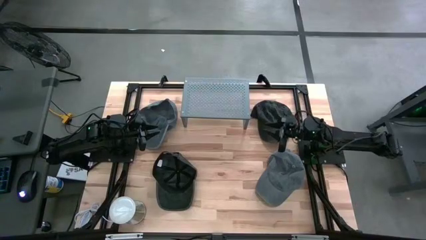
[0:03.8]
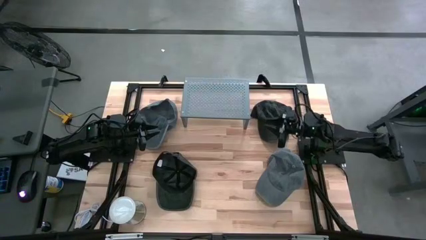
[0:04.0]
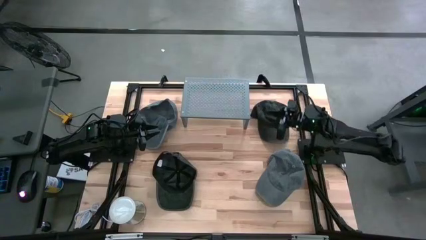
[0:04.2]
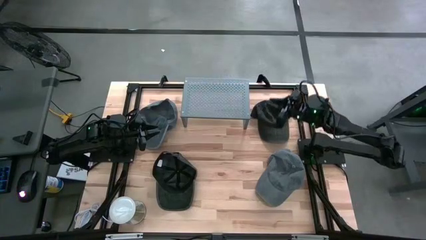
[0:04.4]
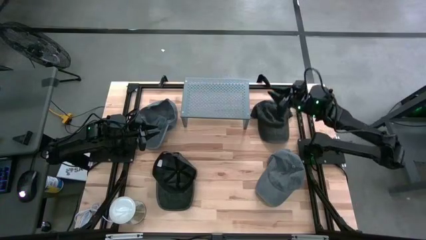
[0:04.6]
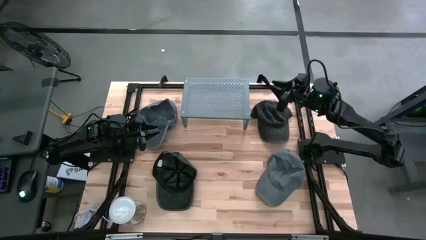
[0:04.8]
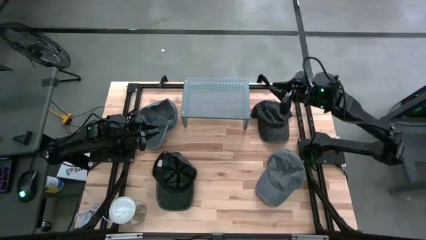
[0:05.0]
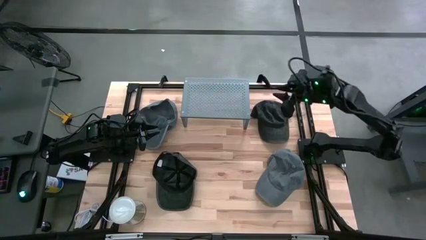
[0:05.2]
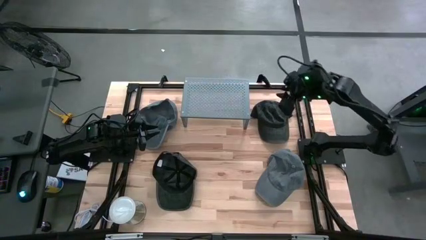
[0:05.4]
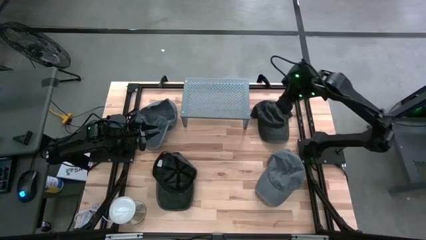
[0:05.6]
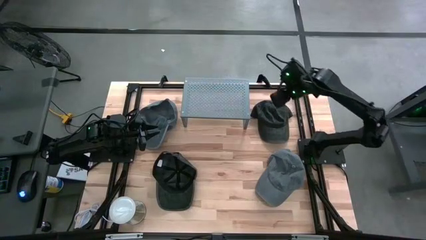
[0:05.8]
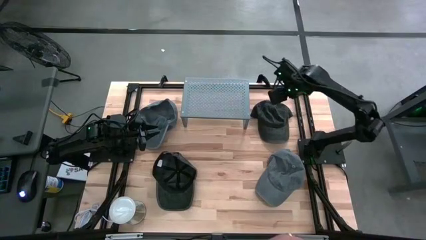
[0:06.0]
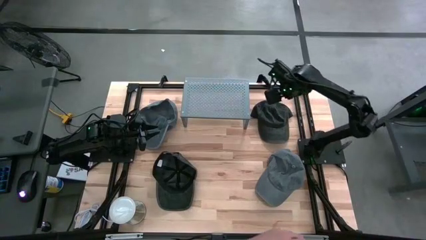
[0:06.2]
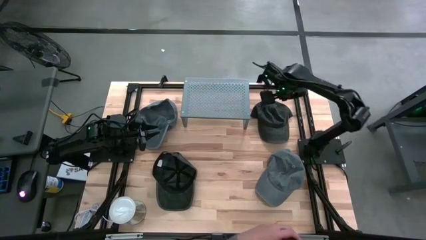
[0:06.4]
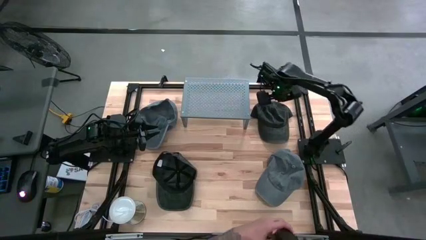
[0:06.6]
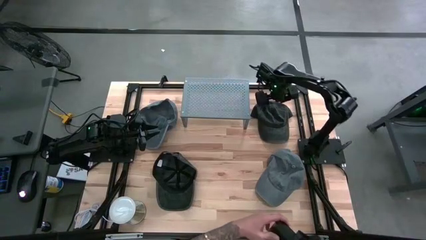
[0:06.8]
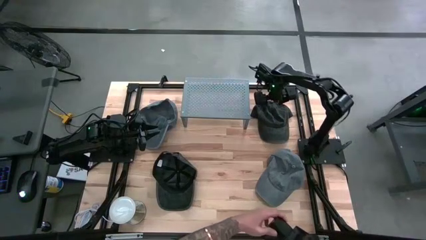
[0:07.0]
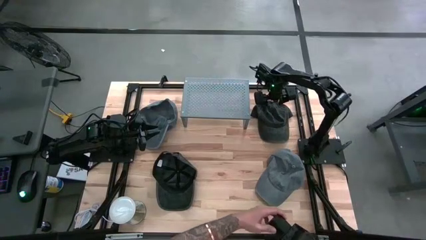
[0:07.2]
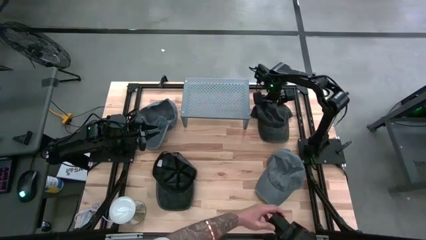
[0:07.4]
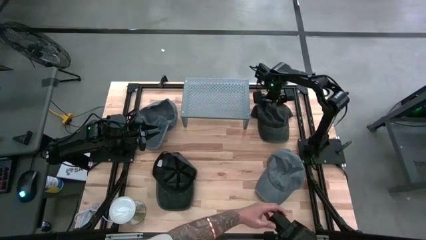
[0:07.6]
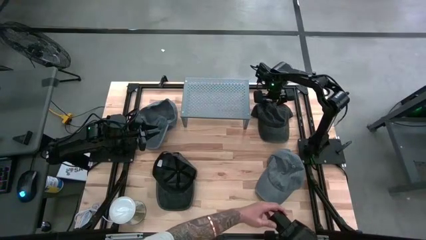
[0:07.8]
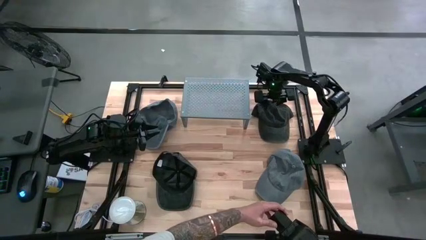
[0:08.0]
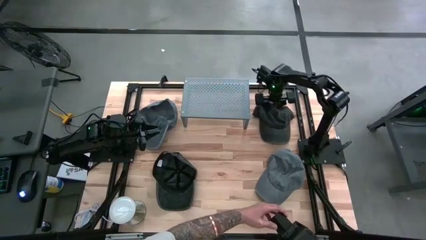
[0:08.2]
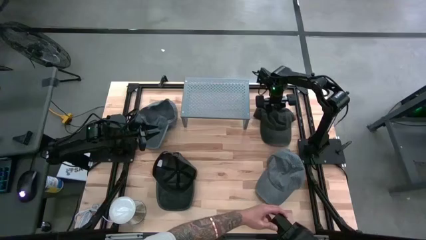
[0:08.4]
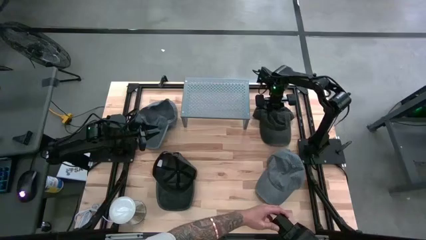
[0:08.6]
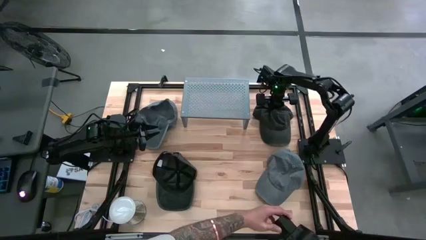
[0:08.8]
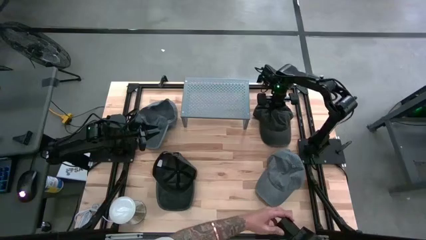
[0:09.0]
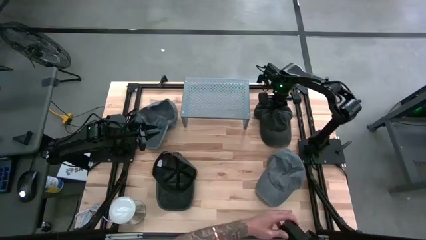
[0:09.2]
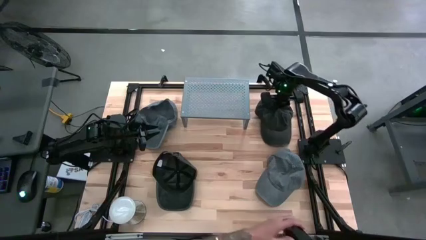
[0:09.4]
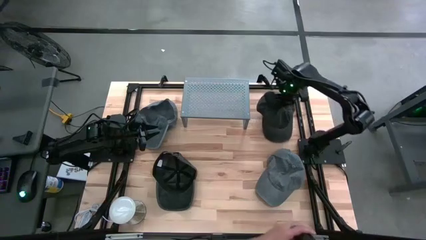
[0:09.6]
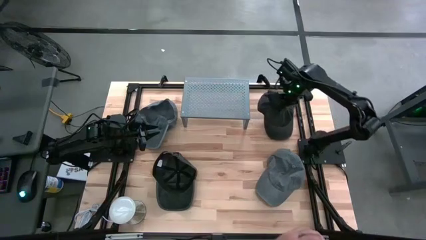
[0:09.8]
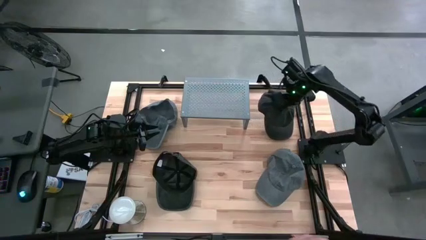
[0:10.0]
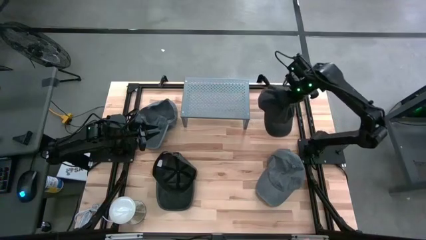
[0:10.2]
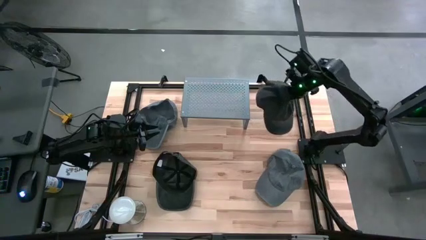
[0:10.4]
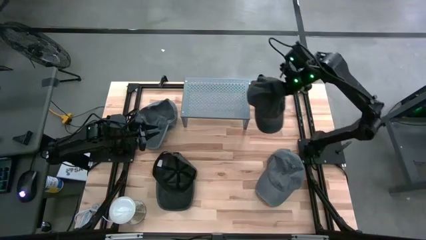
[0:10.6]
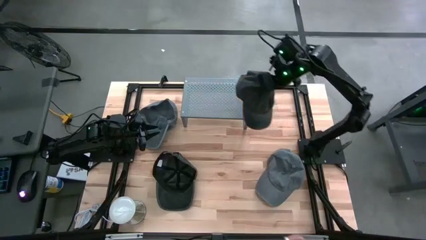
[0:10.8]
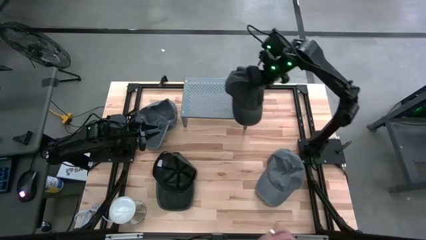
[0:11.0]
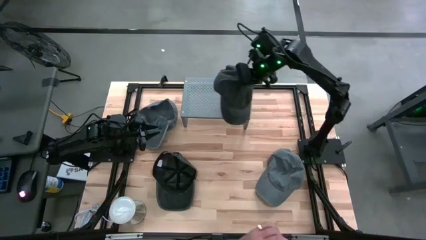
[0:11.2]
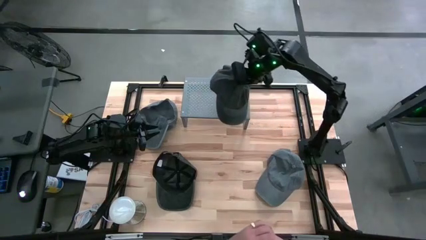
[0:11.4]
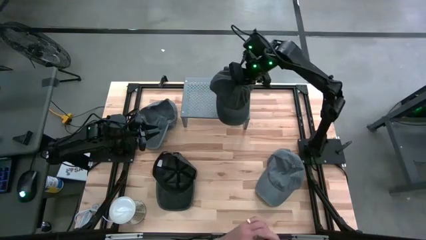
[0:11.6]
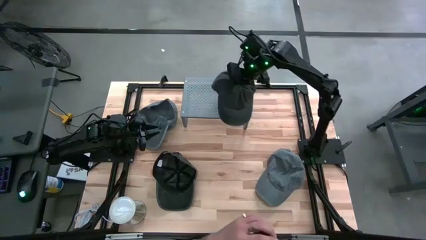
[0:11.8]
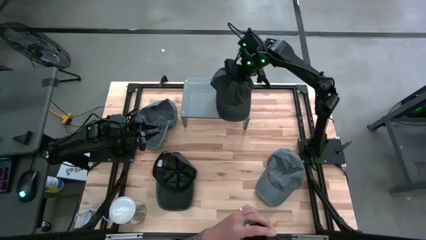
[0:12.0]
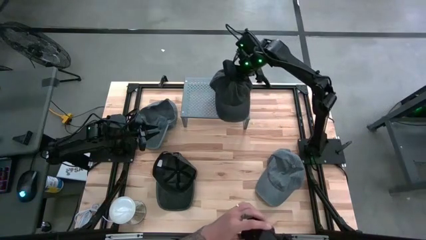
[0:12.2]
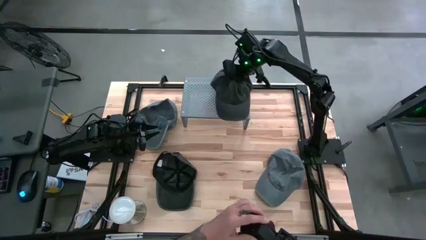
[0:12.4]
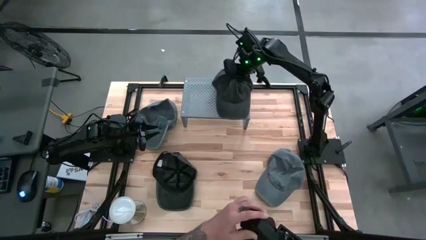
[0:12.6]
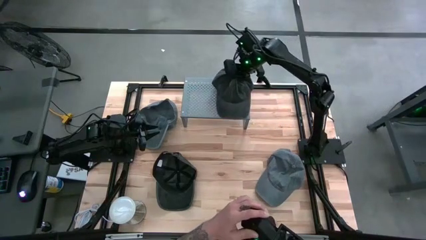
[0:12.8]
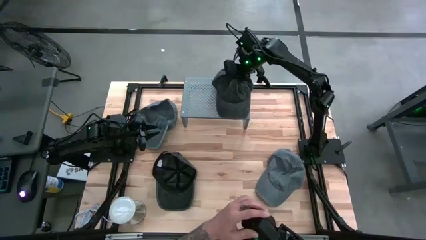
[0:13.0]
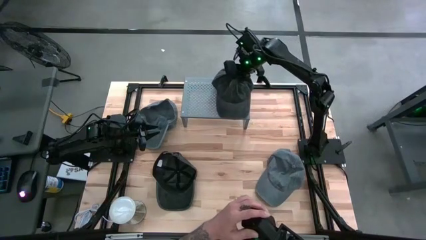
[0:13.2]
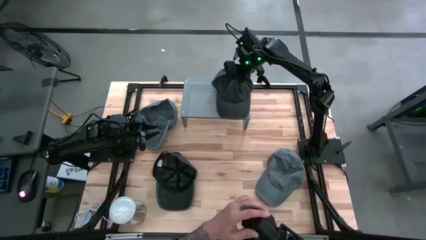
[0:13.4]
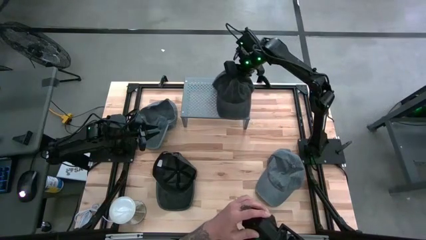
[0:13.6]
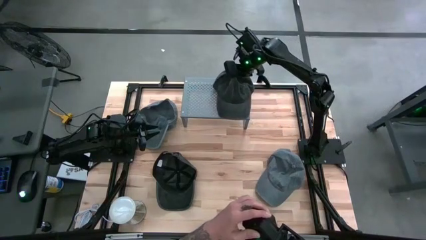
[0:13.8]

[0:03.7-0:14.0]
Task: Pick & Place hat
Put the right black cap on the shelf

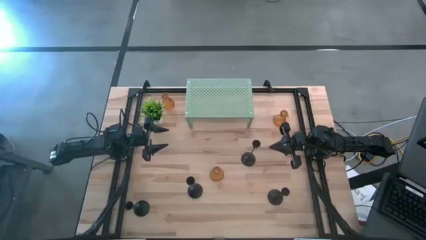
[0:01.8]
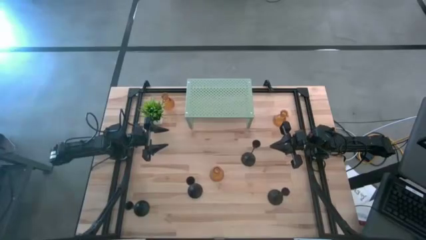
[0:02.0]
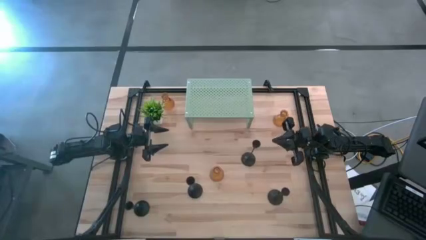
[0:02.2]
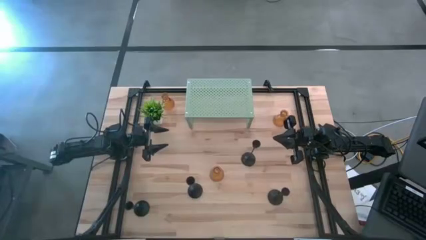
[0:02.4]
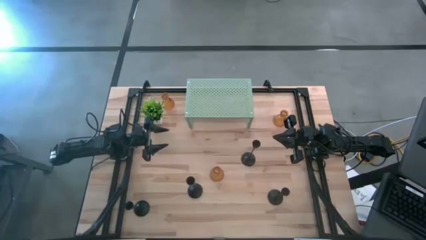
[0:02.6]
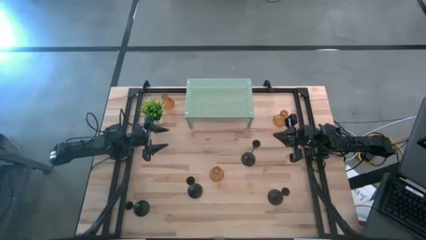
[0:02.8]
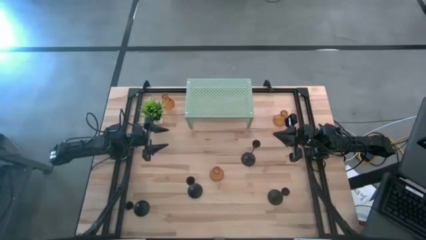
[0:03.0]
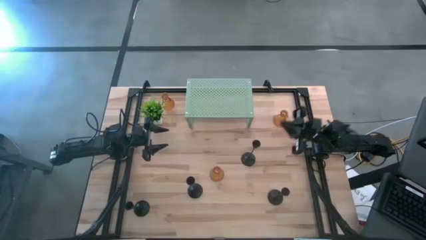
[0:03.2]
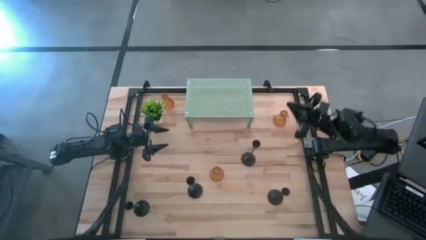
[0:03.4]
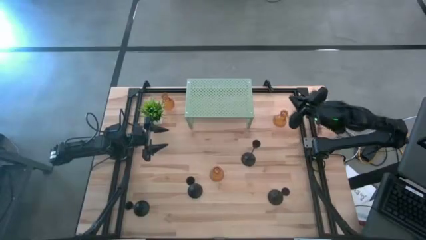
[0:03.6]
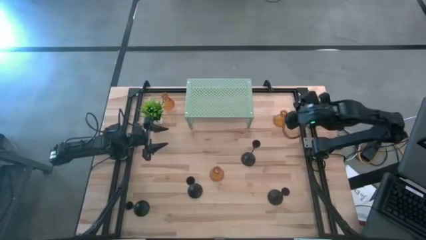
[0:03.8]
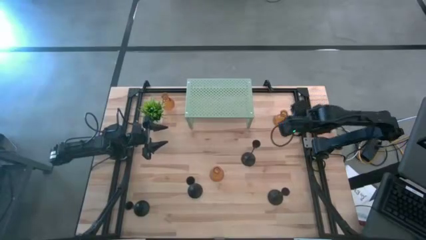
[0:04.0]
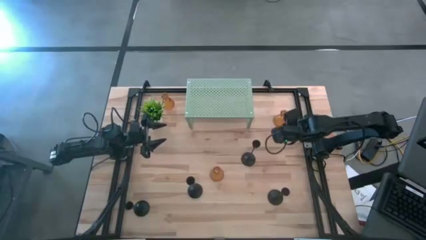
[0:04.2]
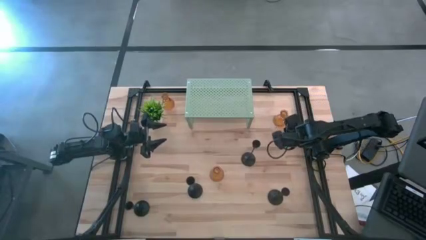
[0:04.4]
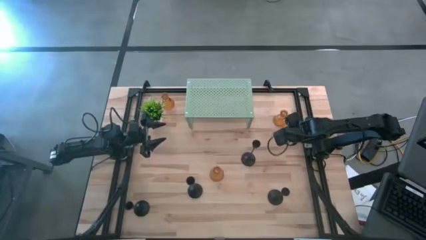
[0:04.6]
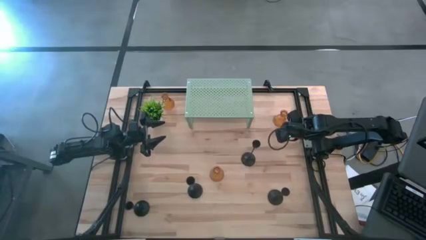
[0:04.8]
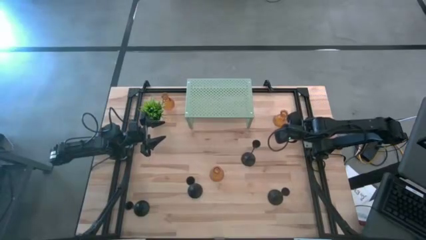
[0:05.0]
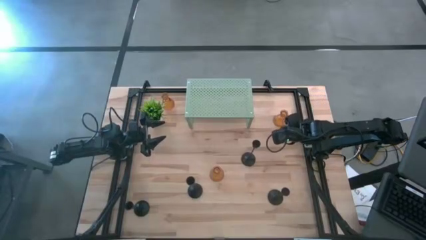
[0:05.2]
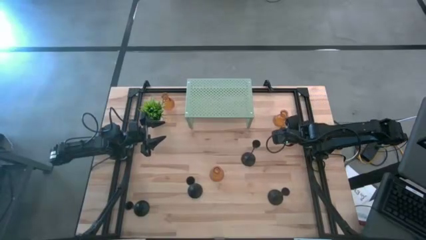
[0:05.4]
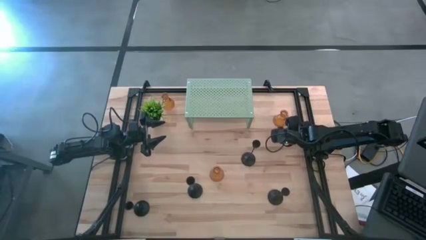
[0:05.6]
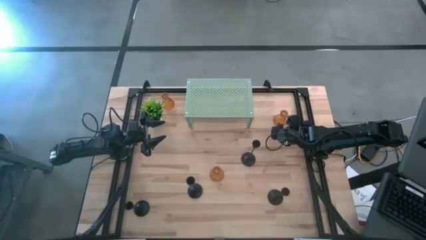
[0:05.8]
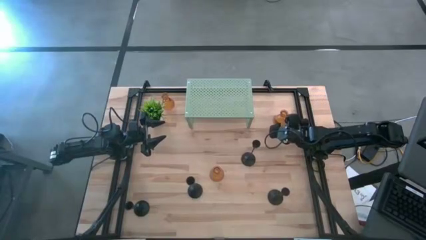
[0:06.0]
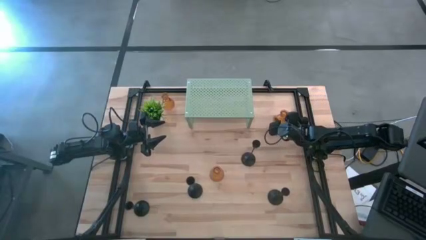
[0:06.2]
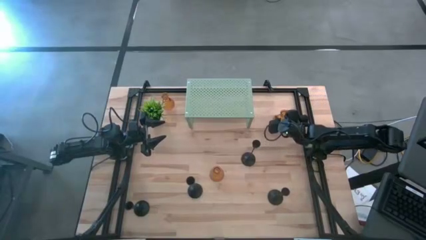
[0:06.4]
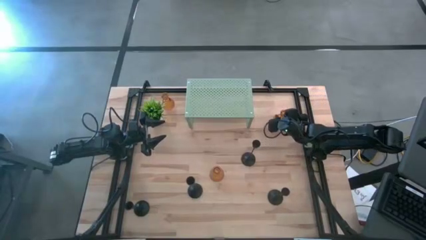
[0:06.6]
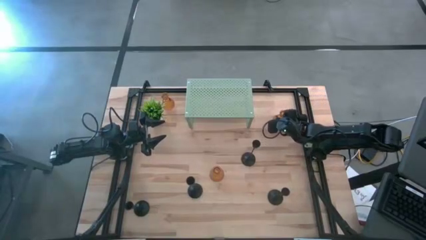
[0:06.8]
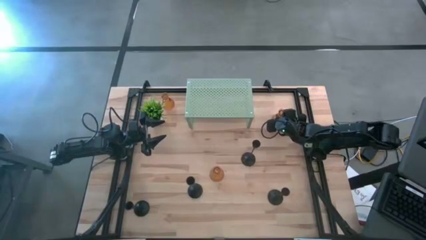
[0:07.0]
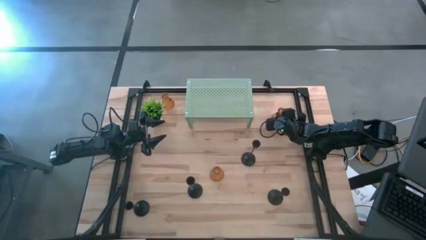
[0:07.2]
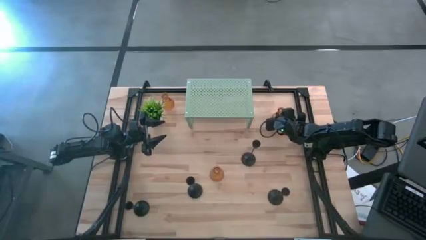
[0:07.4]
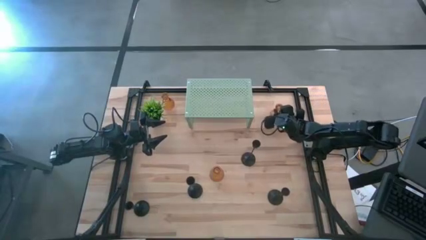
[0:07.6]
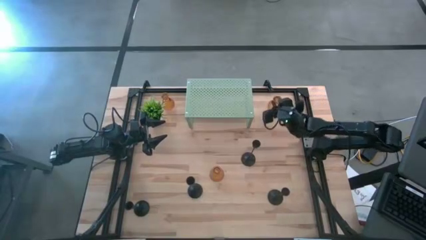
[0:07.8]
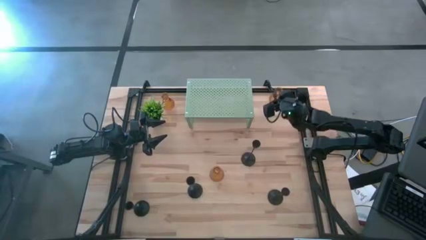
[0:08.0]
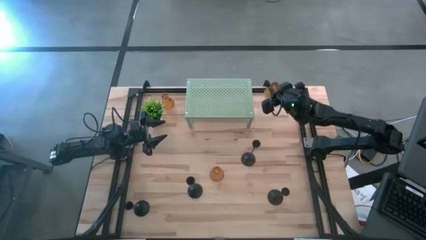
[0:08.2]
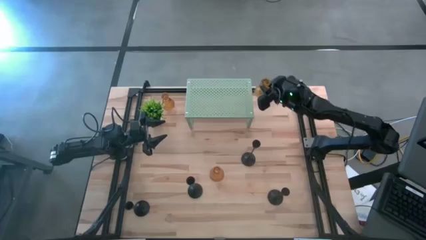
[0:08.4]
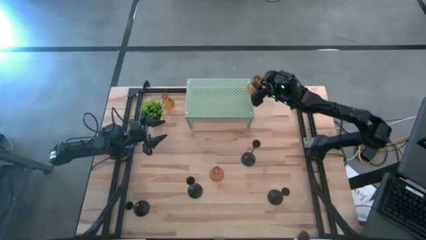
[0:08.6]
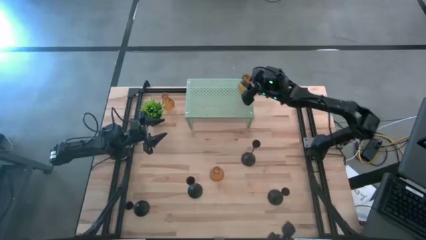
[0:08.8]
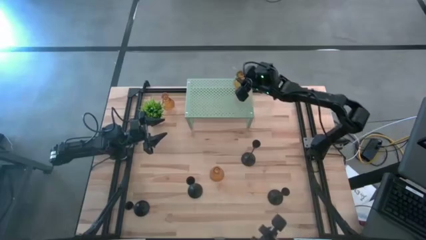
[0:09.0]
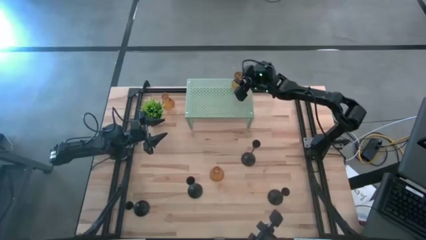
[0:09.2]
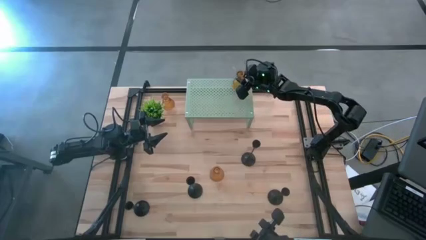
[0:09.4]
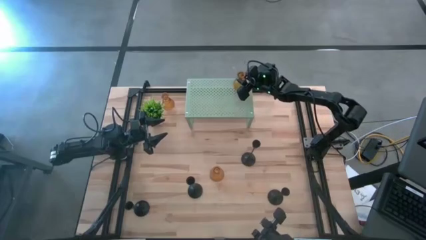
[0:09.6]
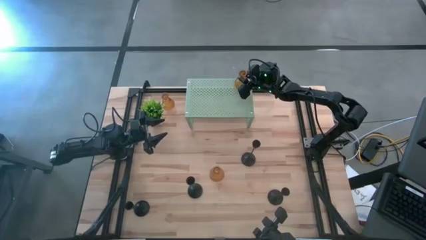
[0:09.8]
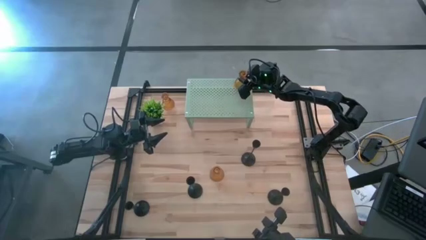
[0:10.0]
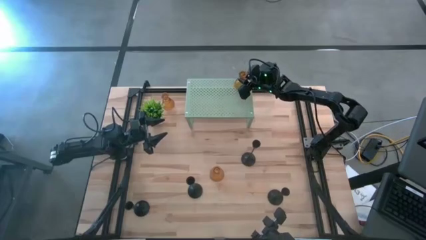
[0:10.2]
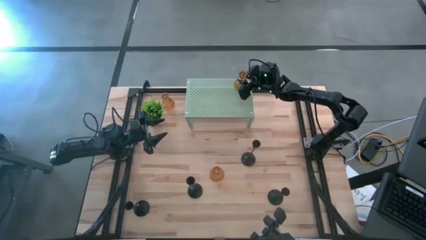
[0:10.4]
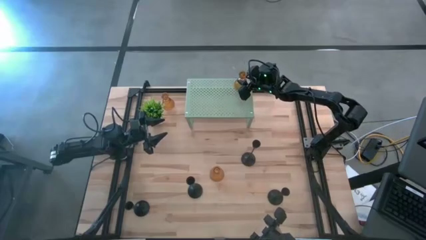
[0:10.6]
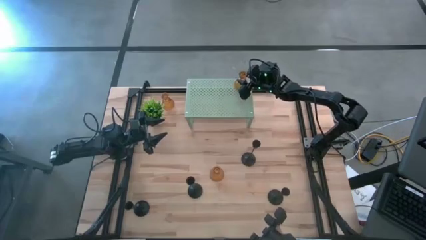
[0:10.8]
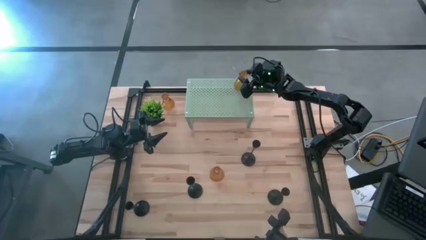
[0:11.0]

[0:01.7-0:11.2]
Task: Pick & Place candle stick holders
Put the yellow glass candle holder on the shelf
